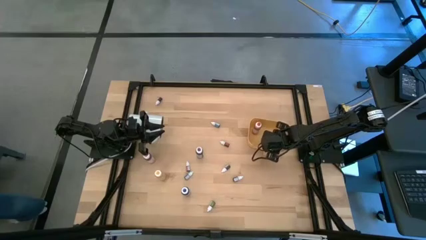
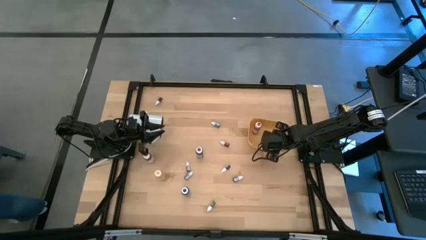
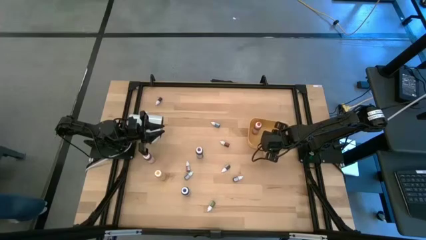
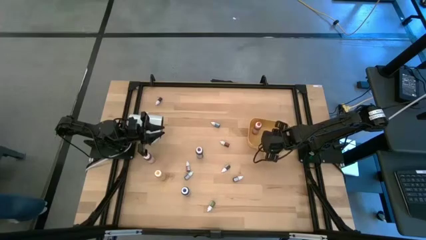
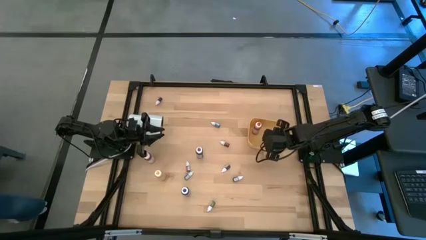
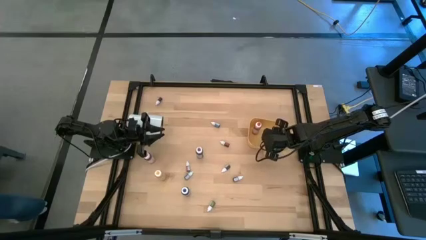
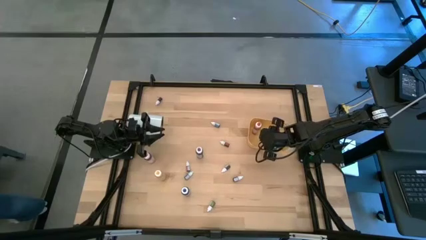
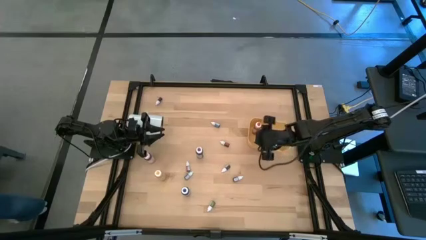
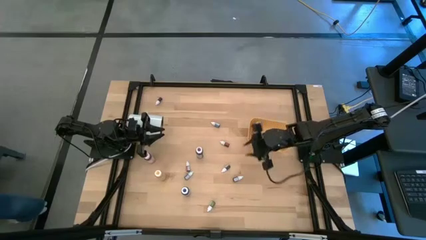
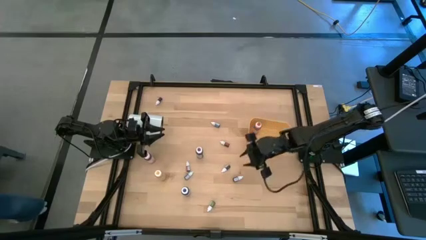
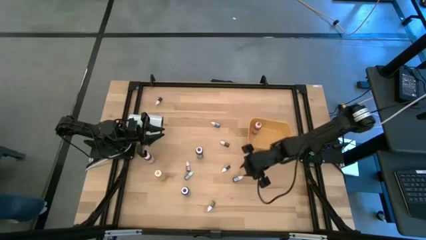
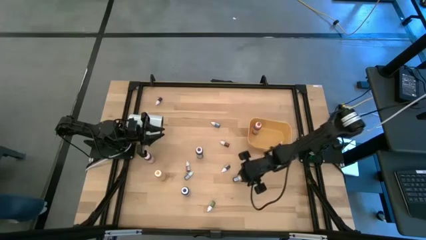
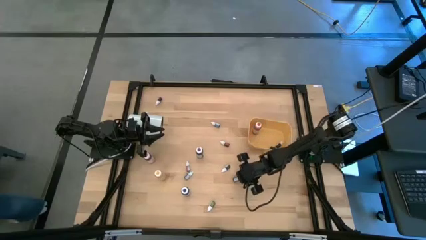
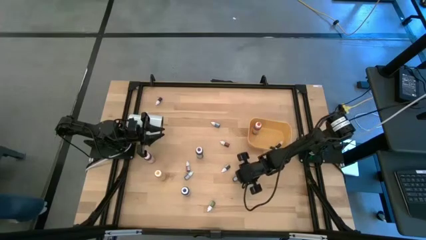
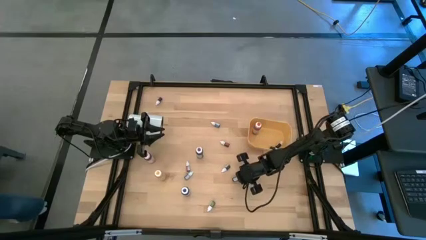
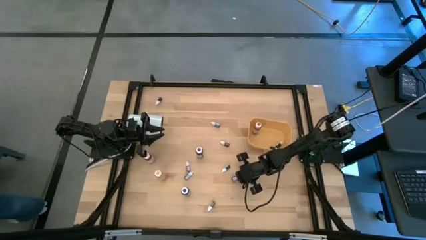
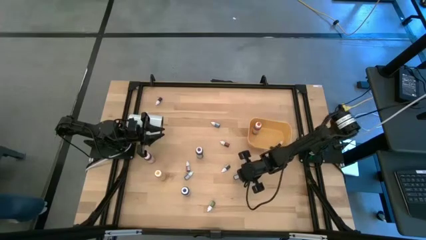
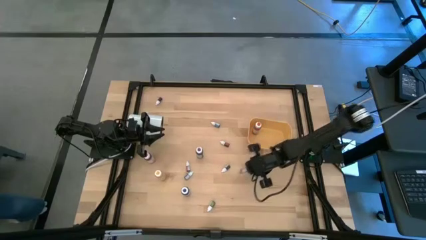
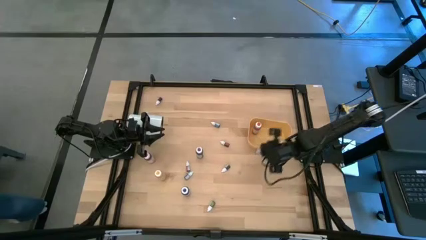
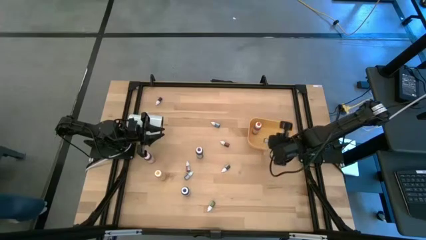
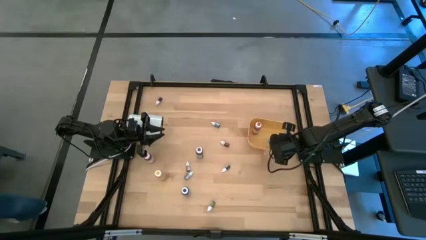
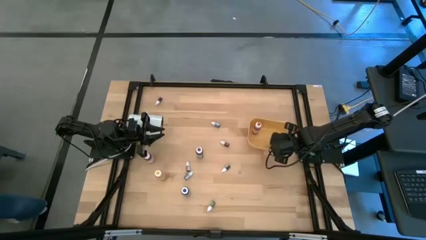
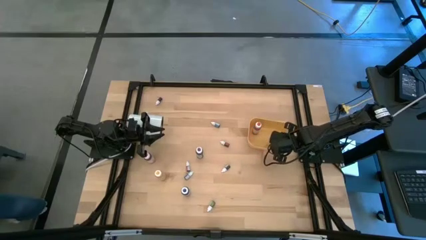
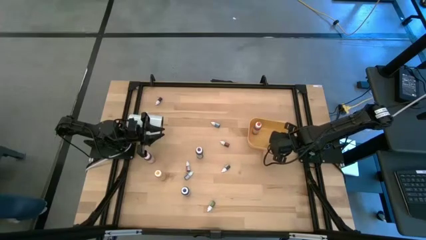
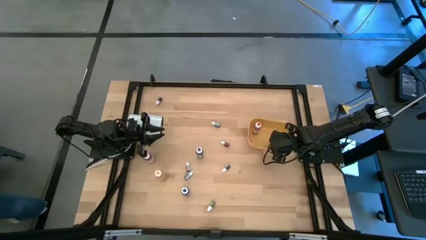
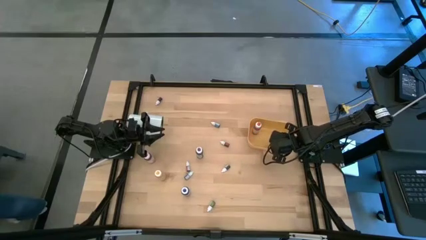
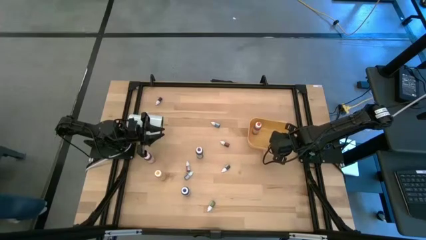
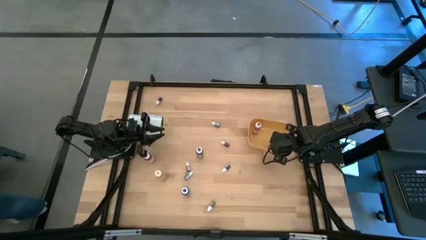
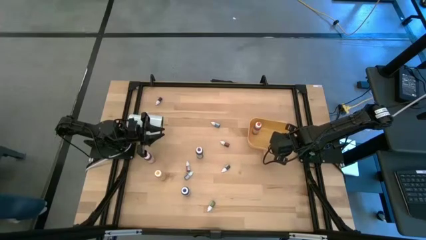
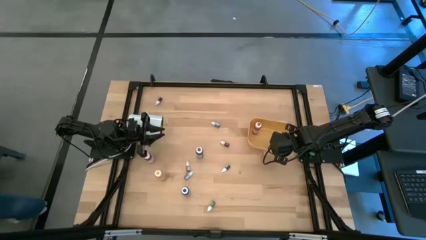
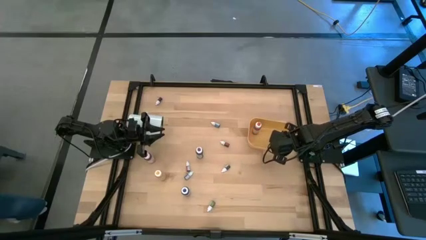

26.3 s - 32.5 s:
Task: Pick & Place food coloring
Put the violet food coloring bottle into the yellow bin

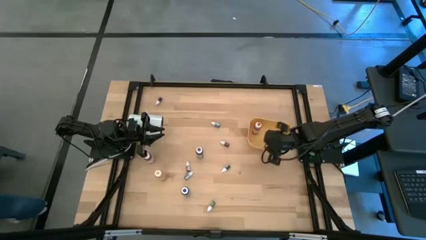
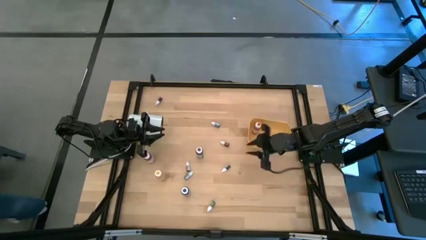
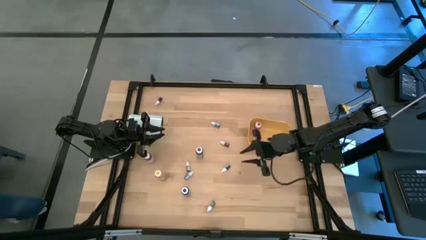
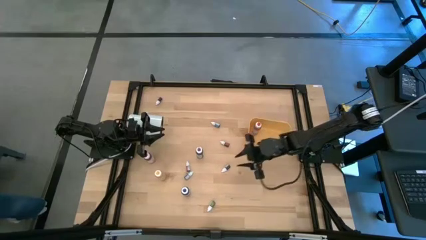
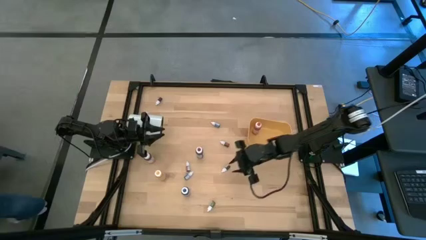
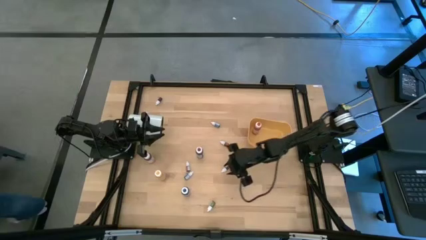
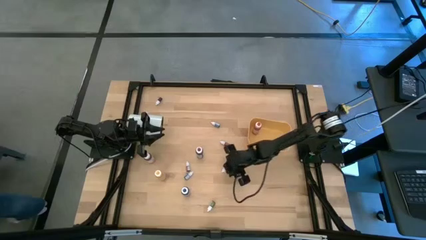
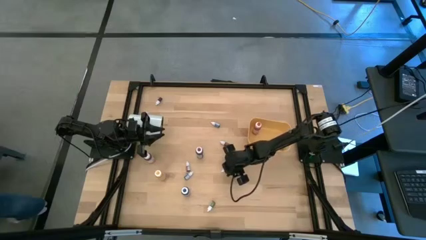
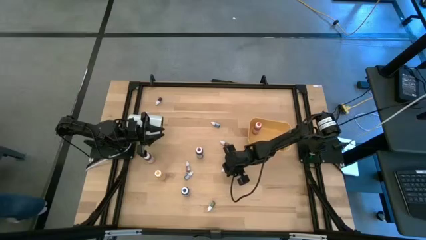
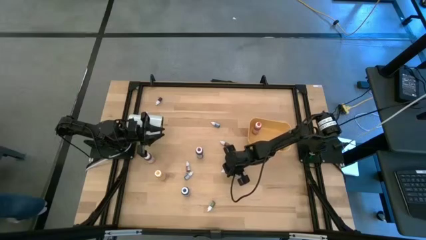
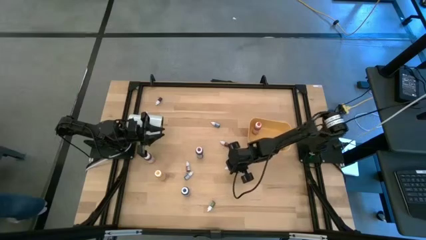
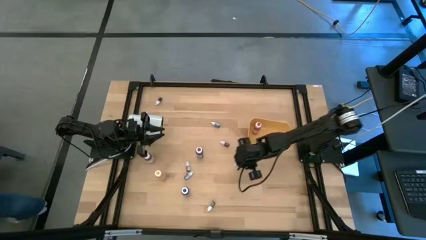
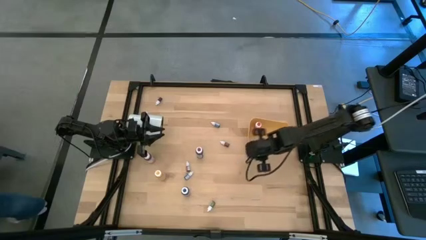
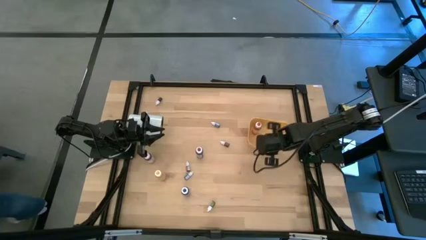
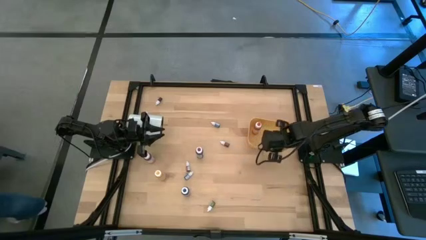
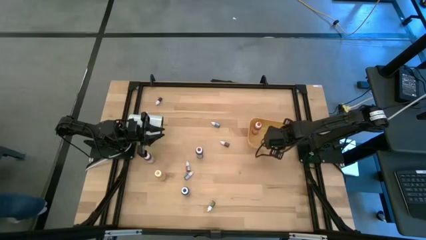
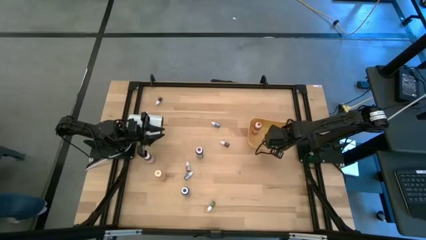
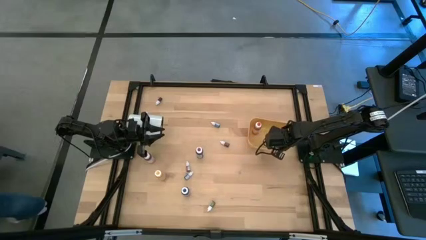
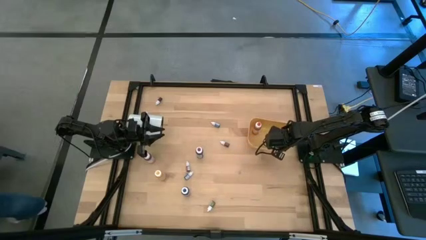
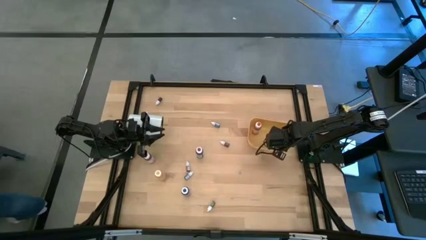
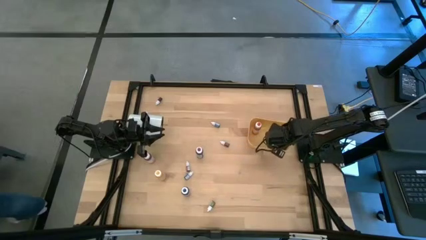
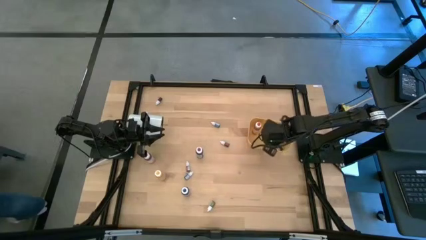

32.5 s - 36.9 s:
Put the brown food coloring bottle into the yellow bin

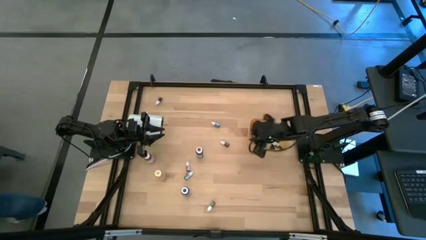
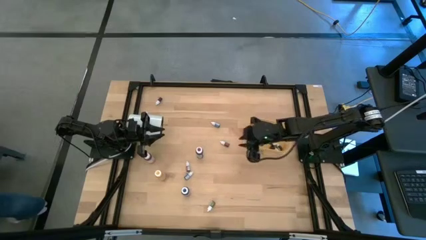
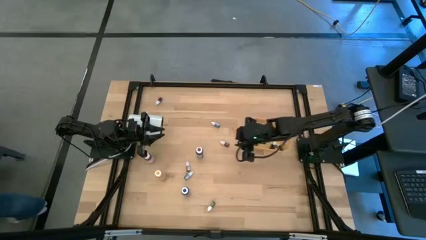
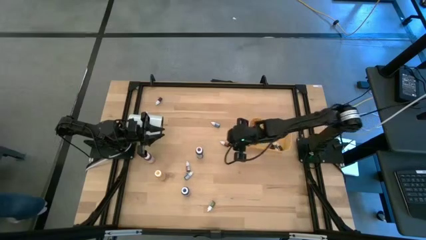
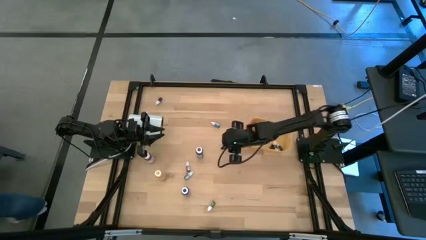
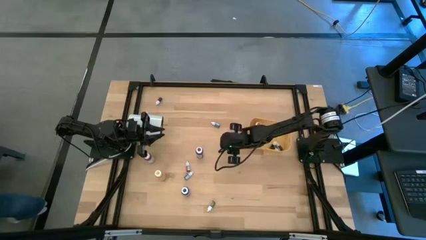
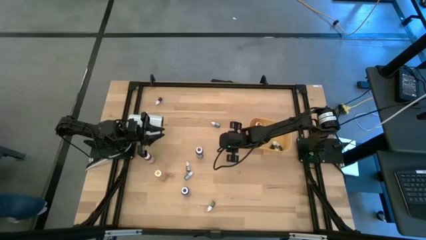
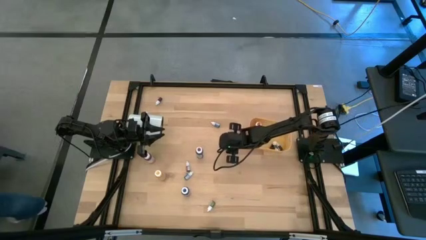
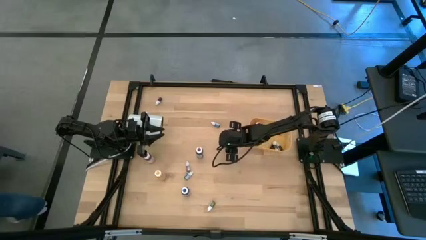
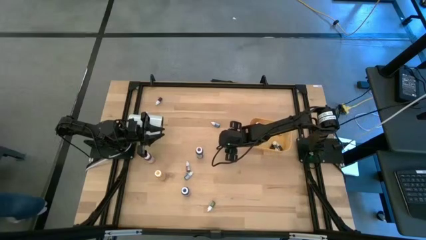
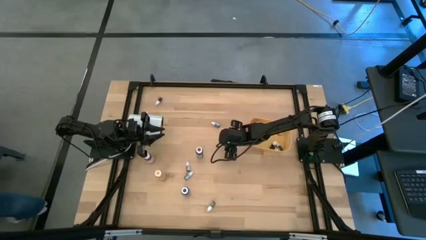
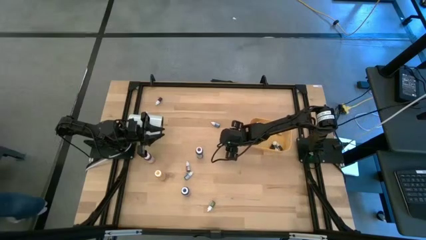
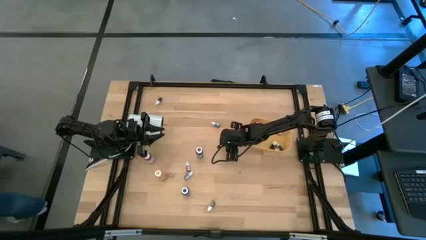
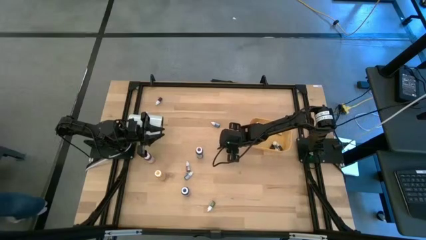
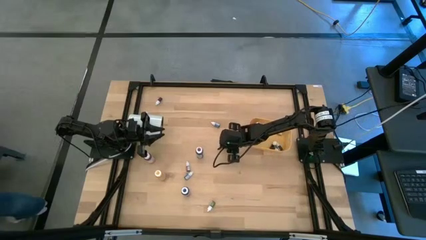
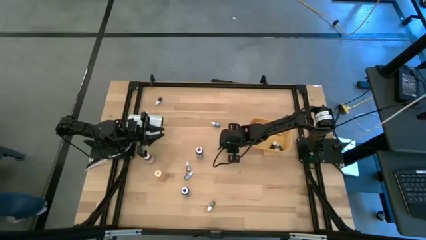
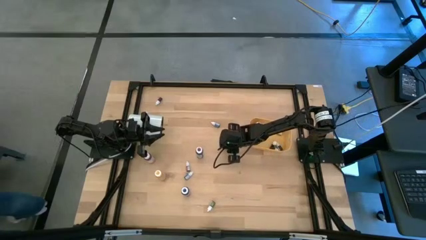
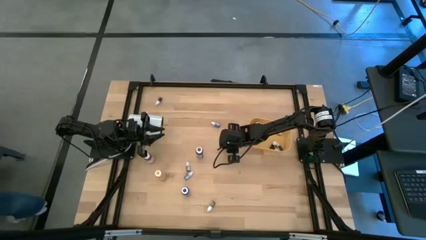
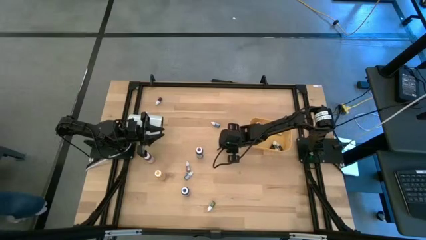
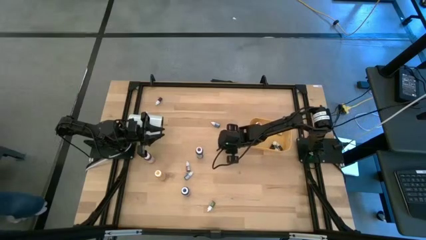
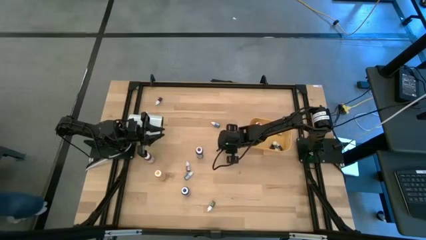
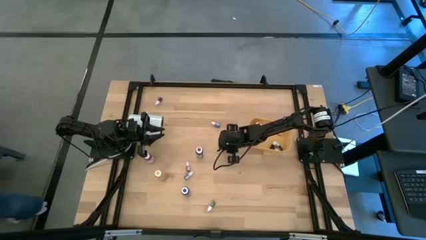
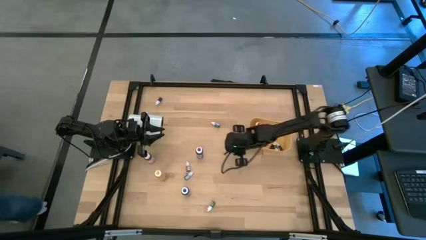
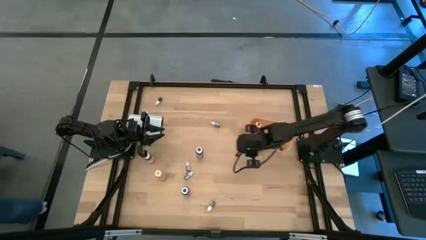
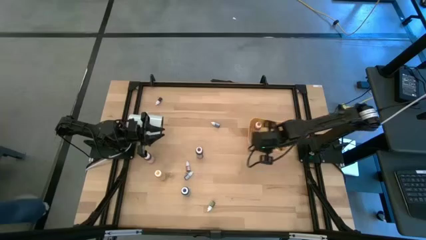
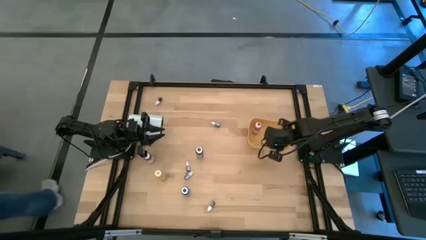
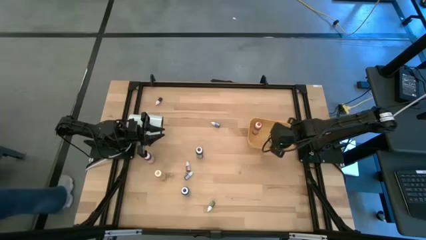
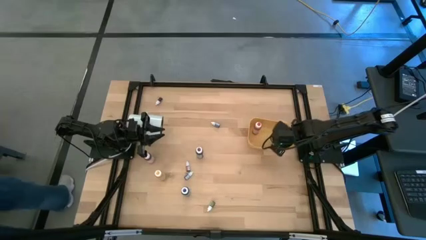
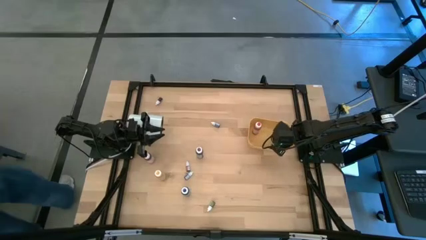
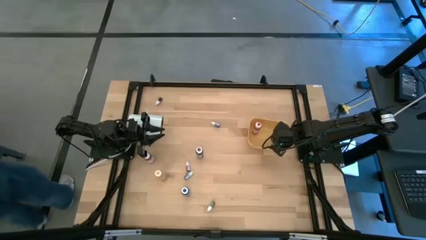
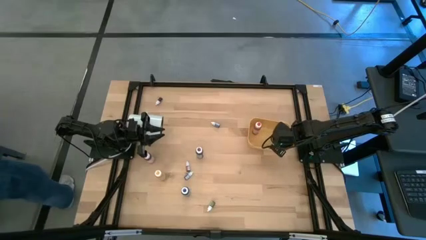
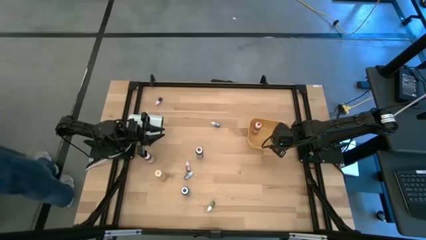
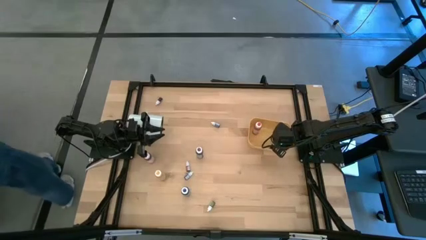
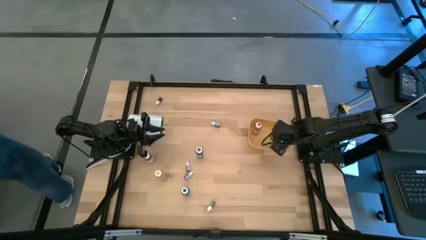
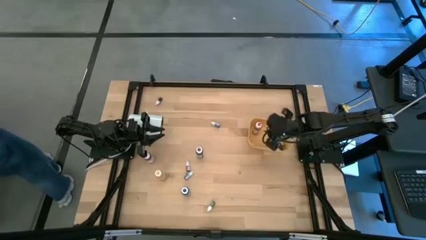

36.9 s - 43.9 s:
Put the red food coloring bottle into the yellow bin
